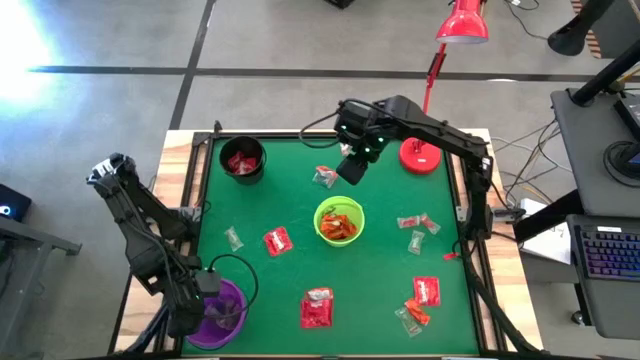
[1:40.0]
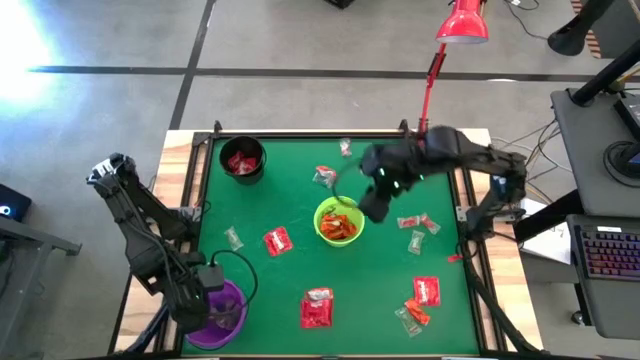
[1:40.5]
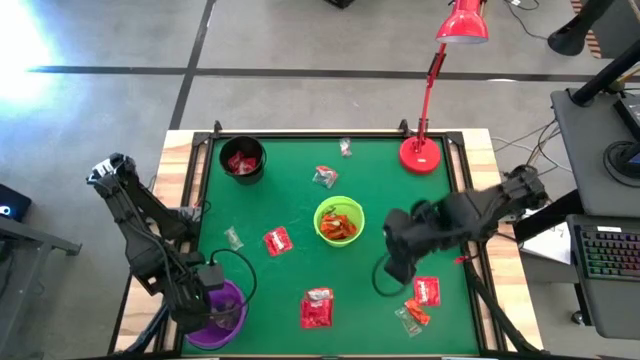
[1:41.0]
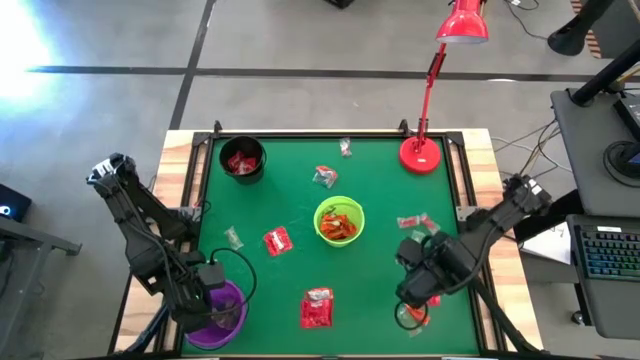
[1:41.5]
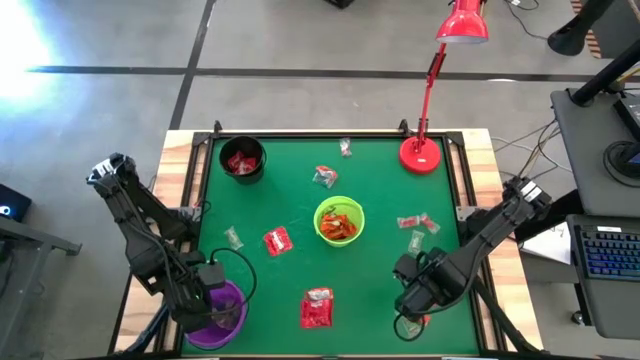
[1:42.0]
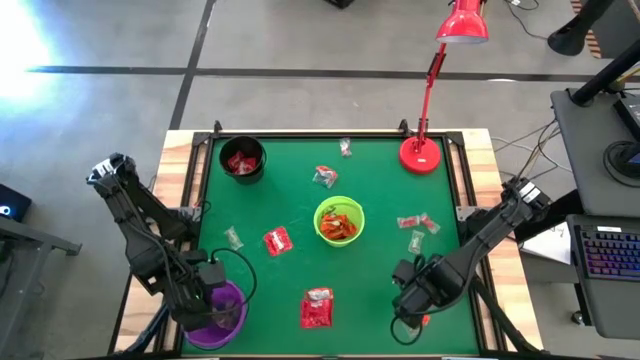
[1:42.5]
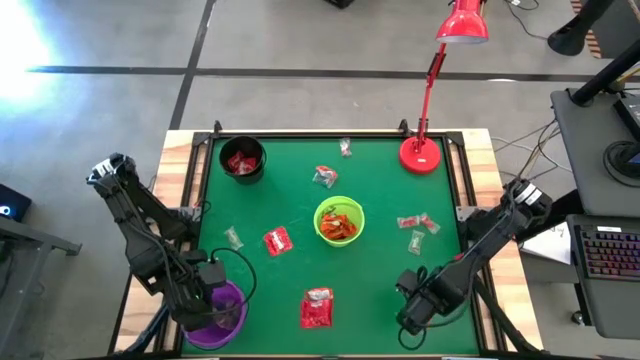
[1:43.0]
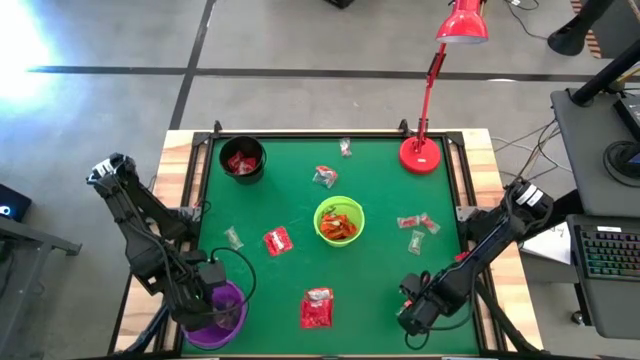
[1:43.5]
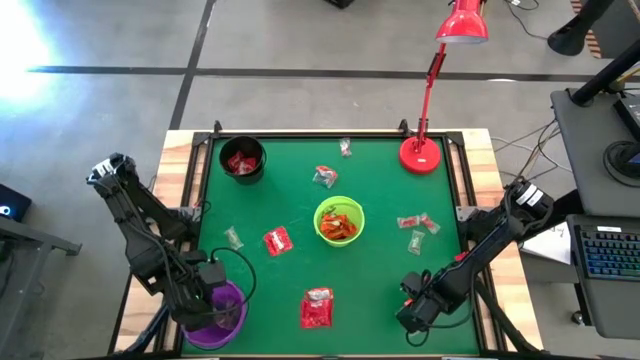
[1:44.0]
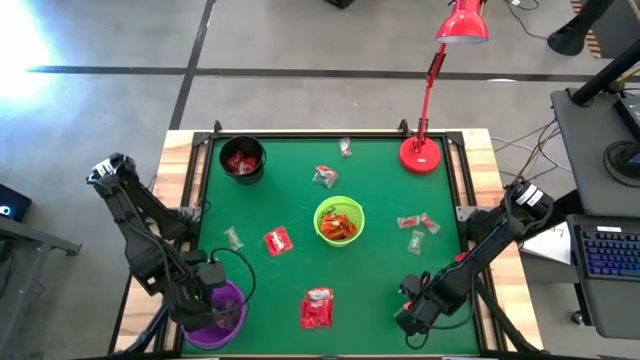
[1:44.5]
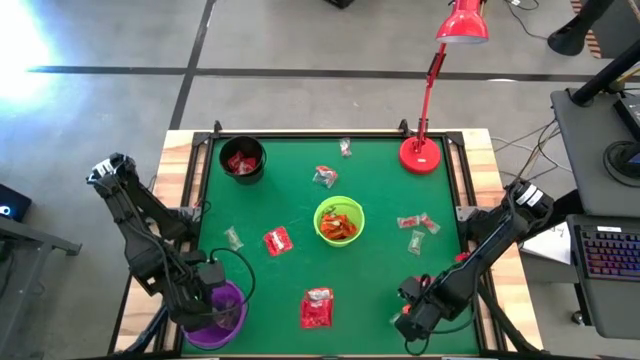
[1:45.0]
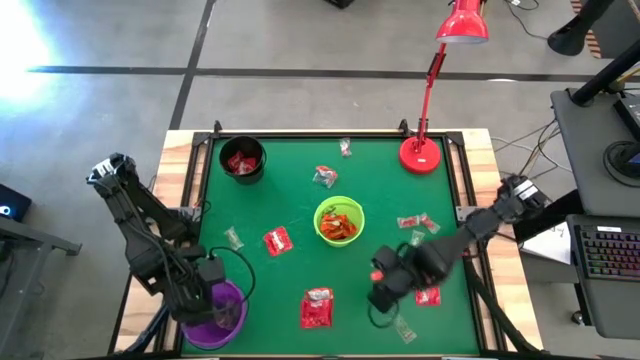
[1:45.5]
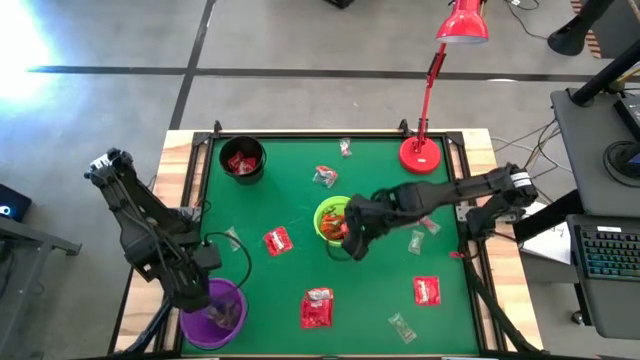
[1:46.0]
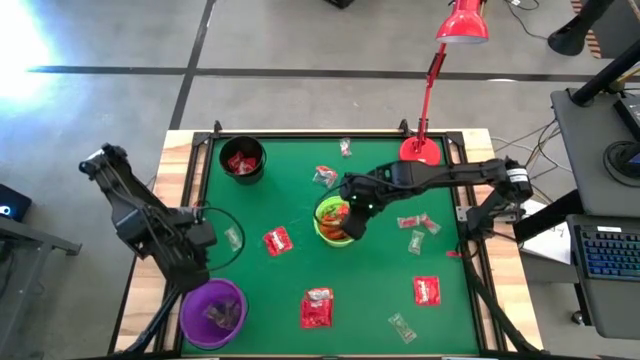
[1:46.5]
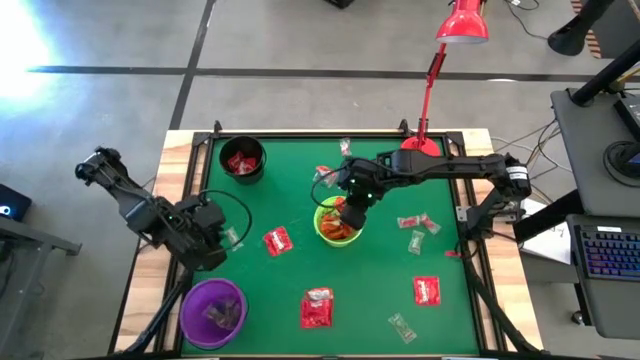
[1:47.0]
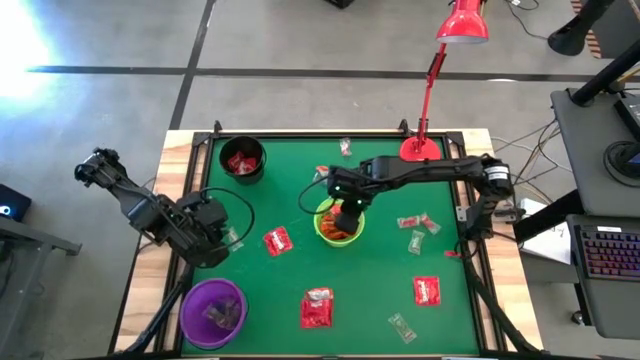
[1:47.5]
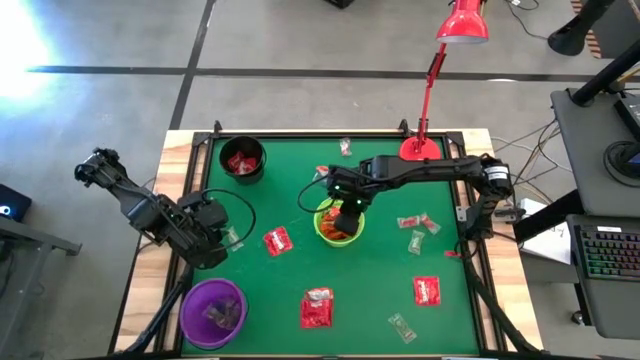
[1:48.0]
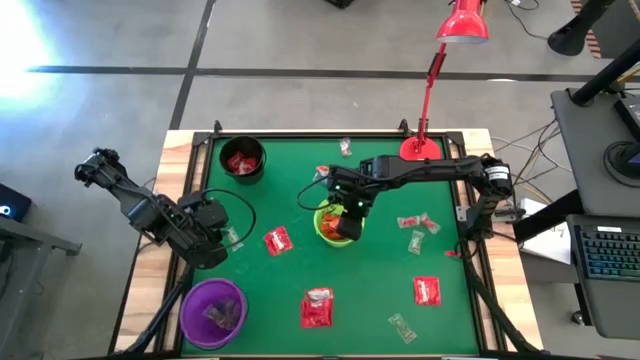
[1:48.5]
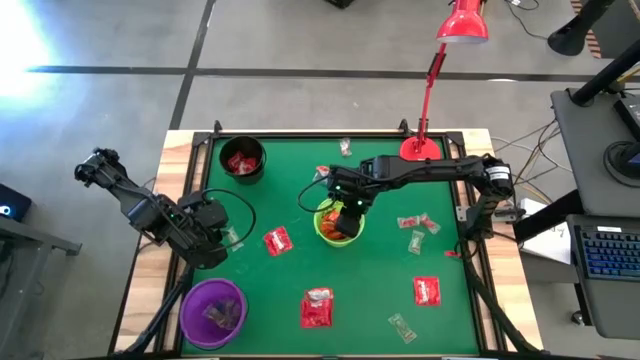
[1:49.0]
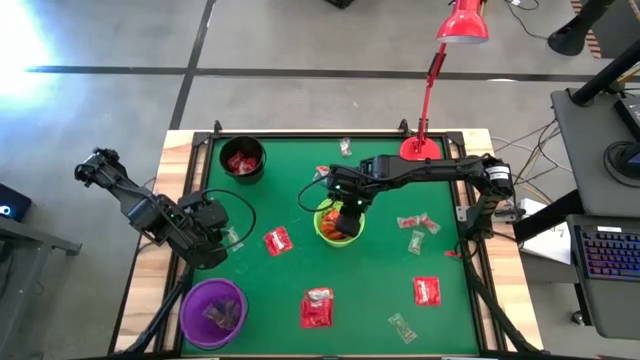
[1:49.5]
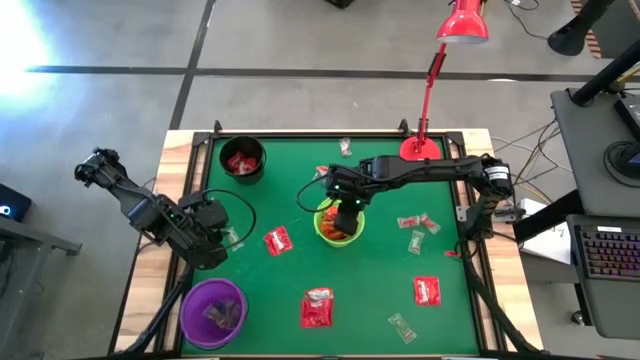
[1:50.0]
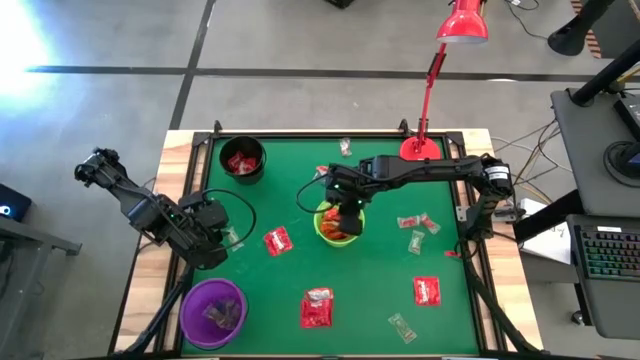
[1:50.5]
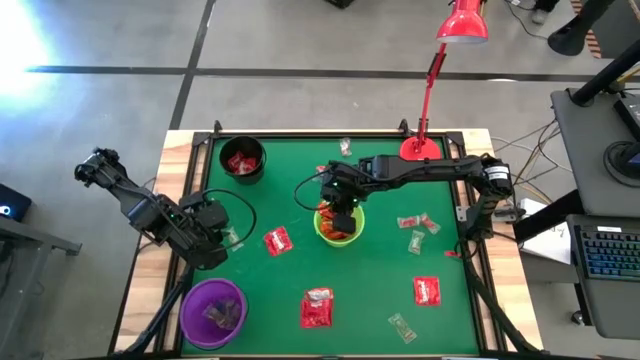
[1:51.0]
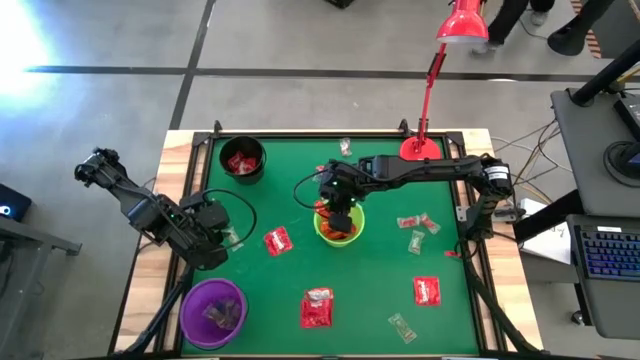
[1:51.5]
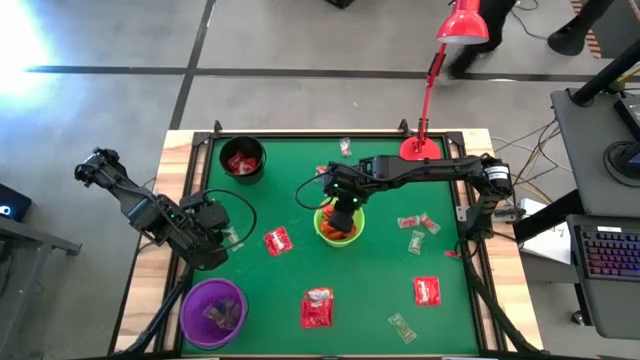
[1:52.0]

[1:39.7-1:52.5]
Task: Sort candy
Put the orange chocolate into the green bucket

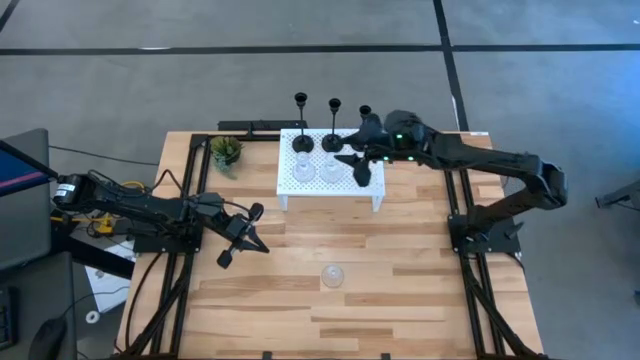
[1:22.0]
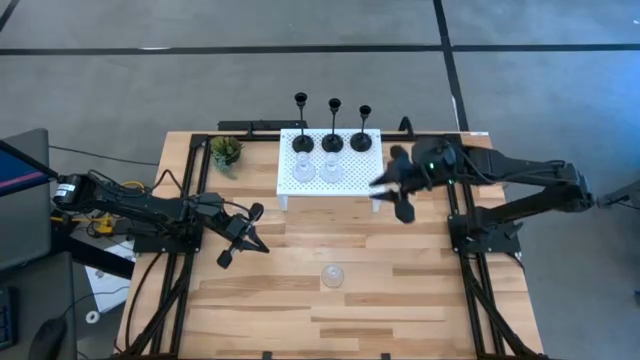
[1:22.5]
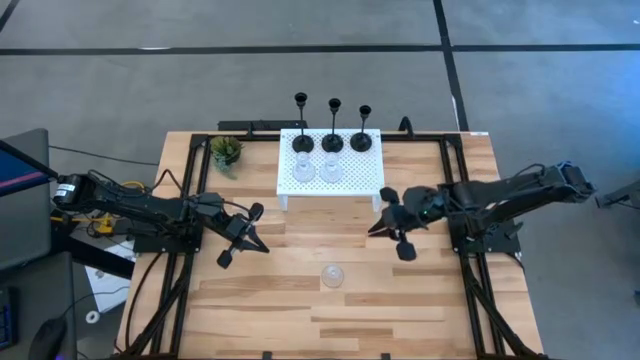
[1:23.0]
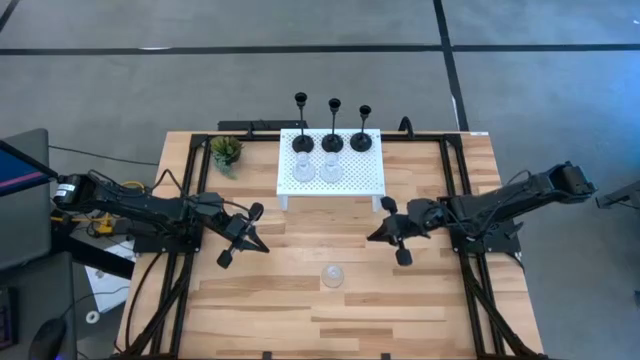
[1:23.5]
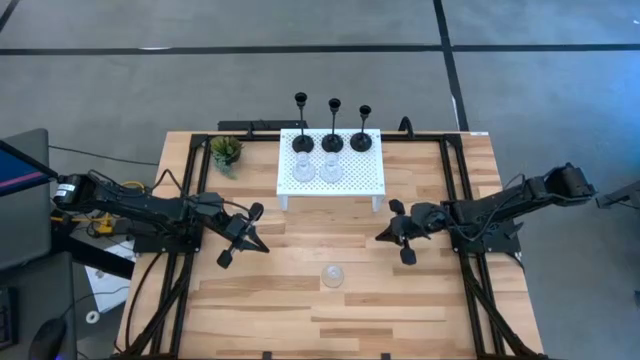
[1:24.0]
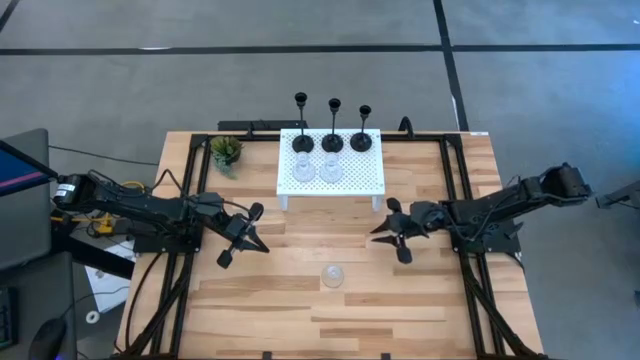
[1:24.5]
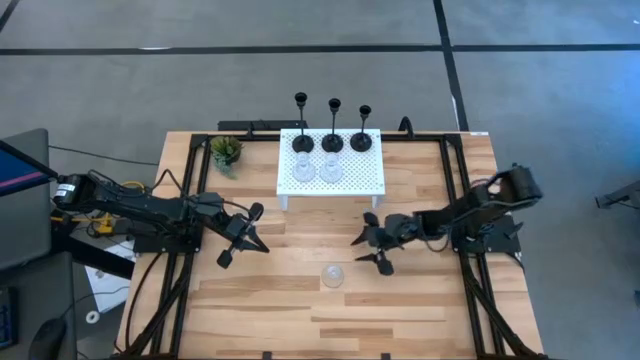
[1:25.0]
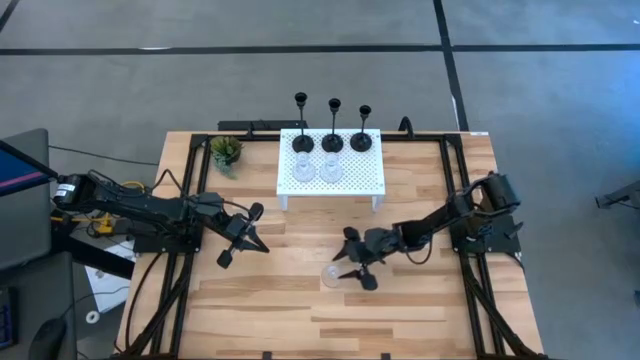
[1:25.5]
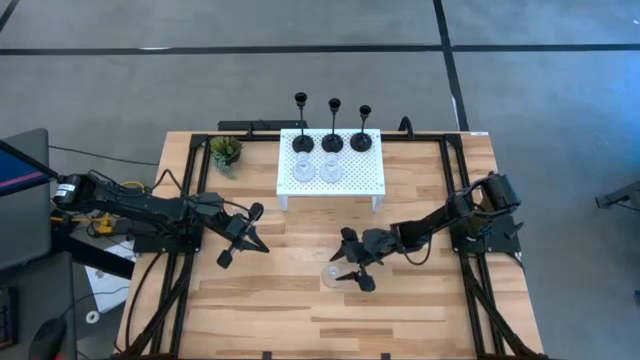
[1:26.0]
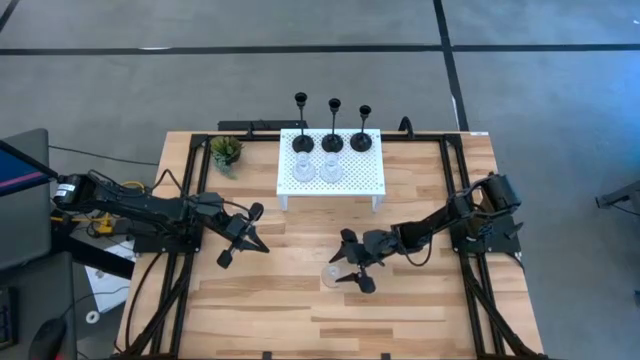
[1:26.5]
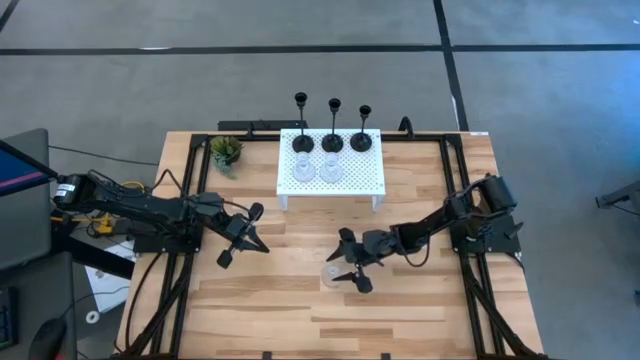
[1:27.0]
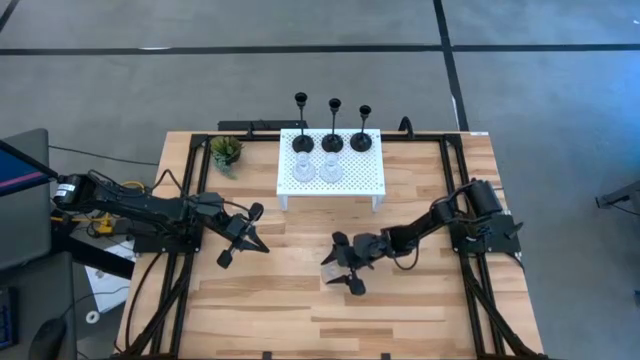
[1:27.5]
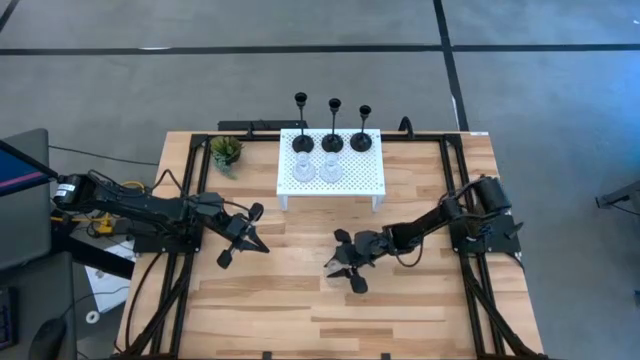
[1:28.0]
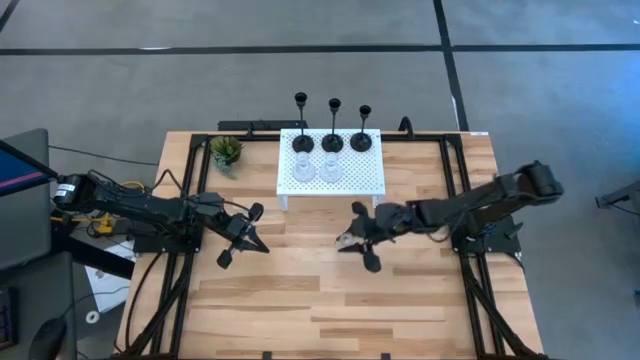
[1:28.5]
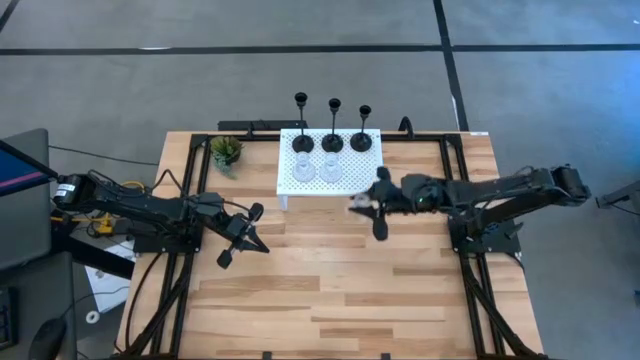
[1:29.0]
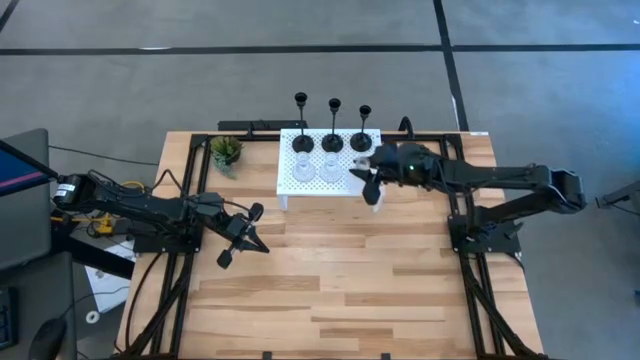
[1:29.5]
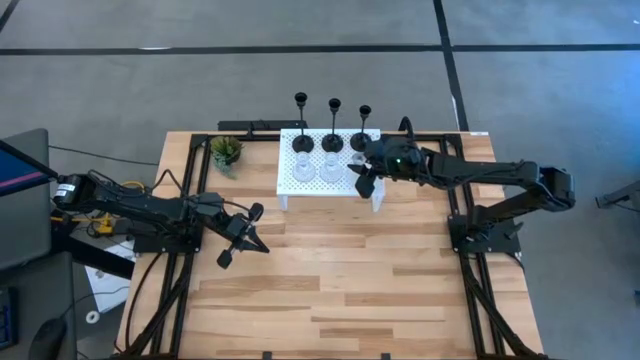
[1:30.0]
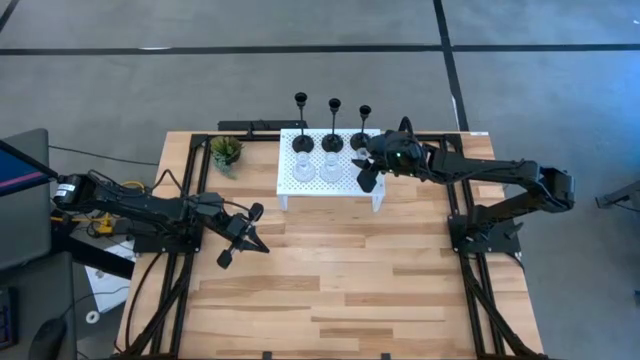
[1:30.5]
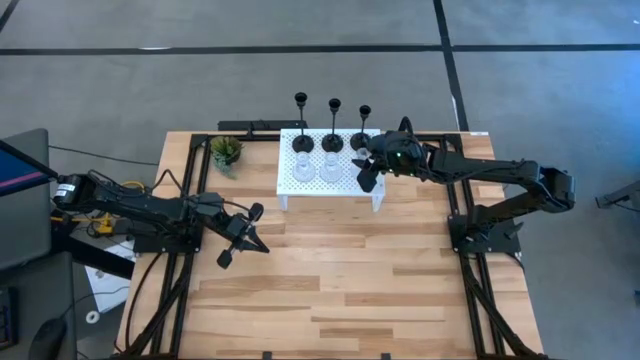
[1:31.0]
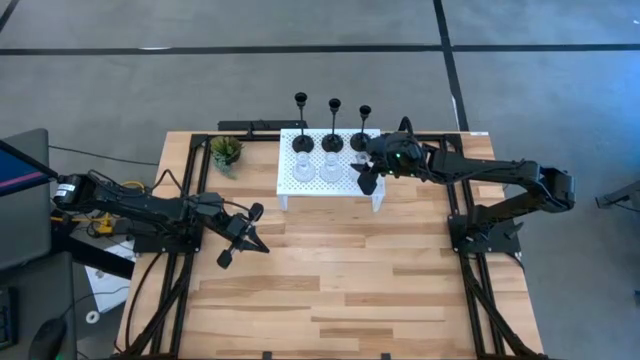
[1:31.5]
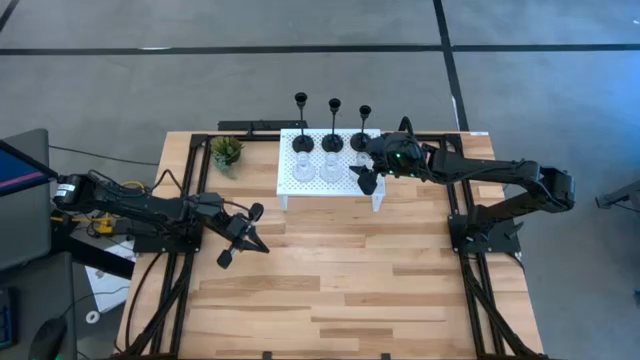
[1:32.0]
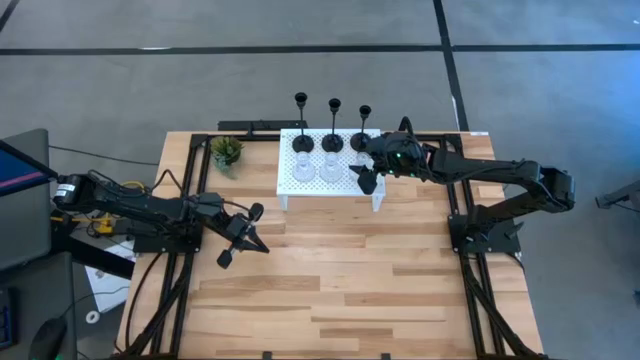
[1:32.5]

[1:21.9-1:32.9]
Task: Pick & Place candle stick holders
Put the transparent candle holder on the shelf
